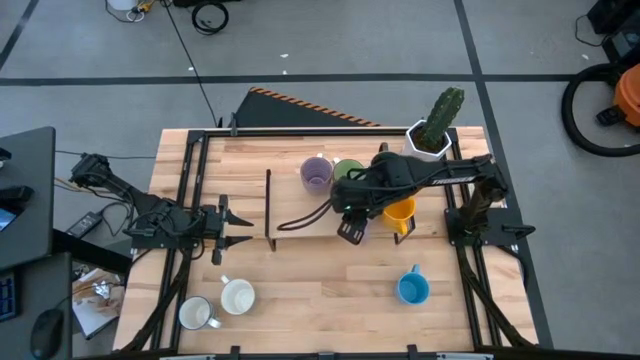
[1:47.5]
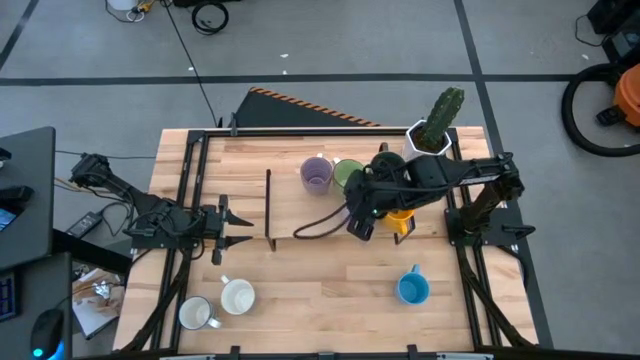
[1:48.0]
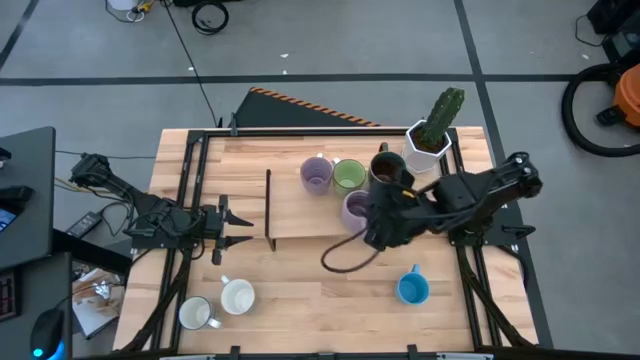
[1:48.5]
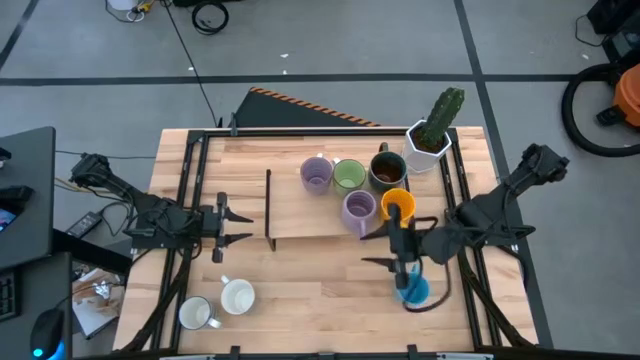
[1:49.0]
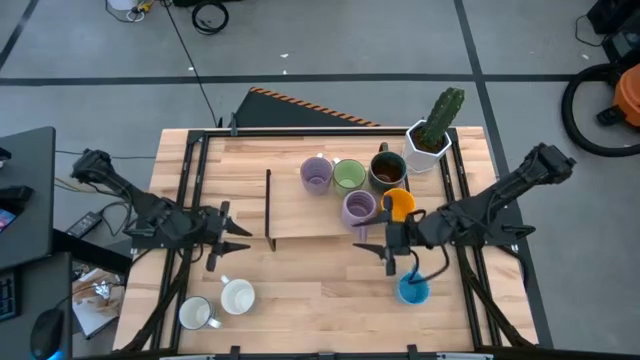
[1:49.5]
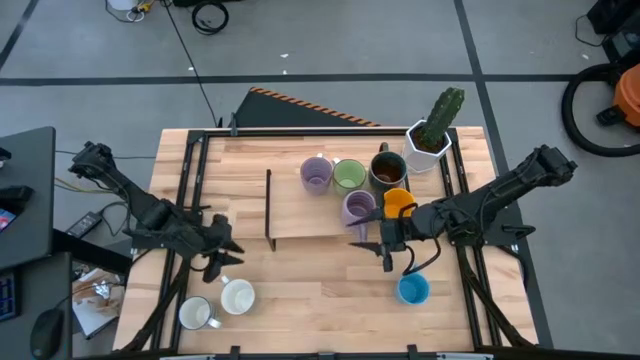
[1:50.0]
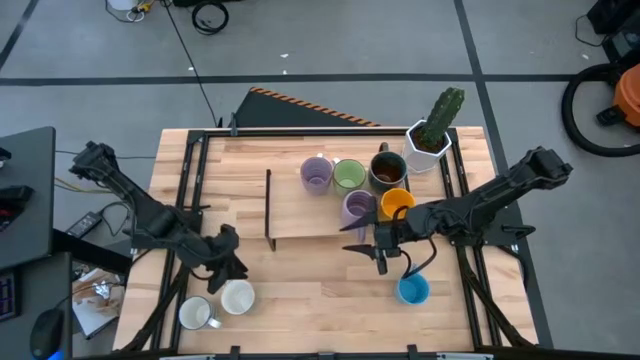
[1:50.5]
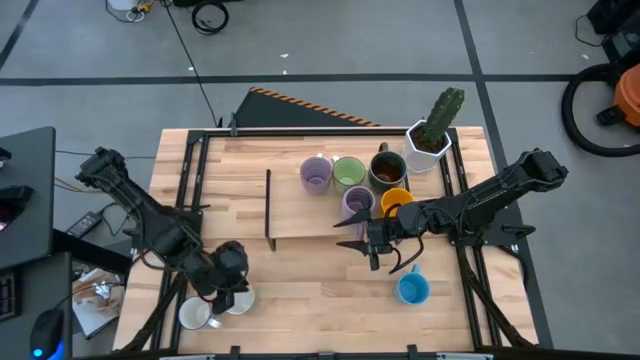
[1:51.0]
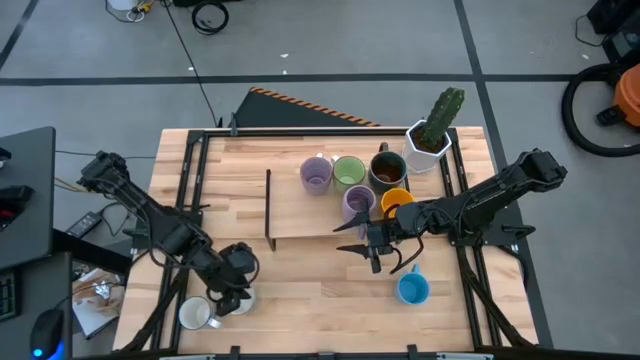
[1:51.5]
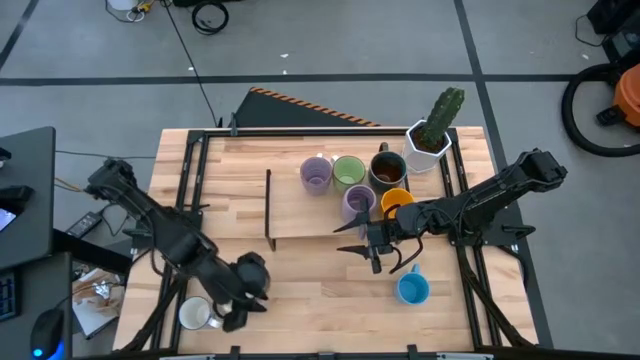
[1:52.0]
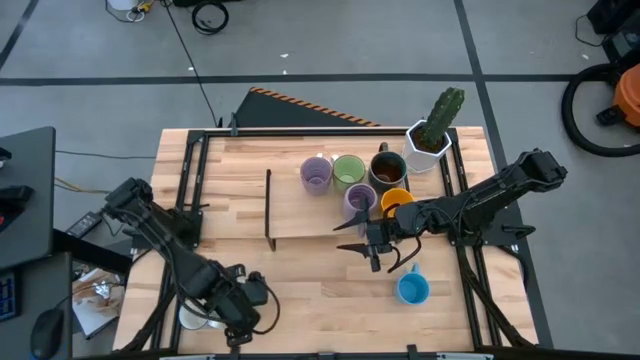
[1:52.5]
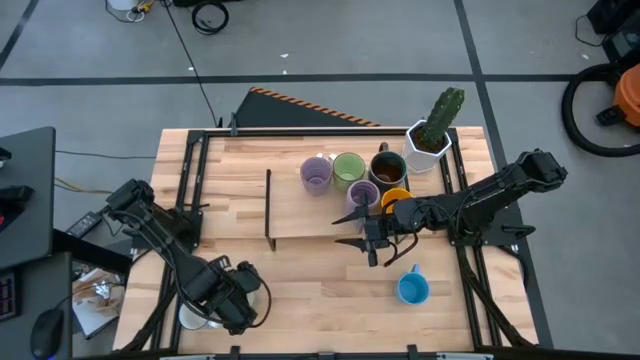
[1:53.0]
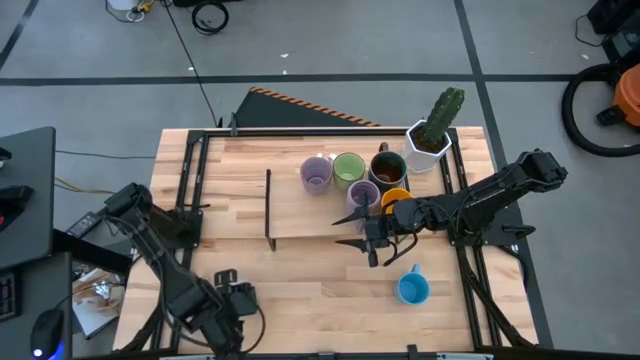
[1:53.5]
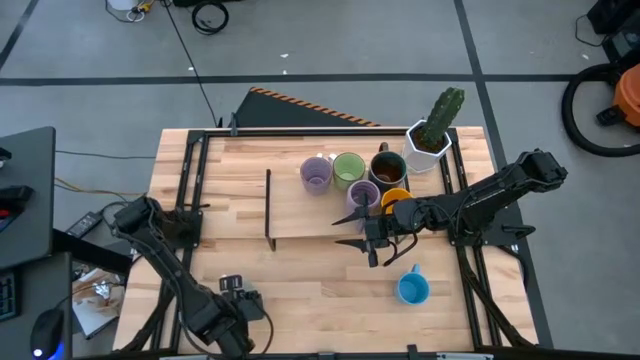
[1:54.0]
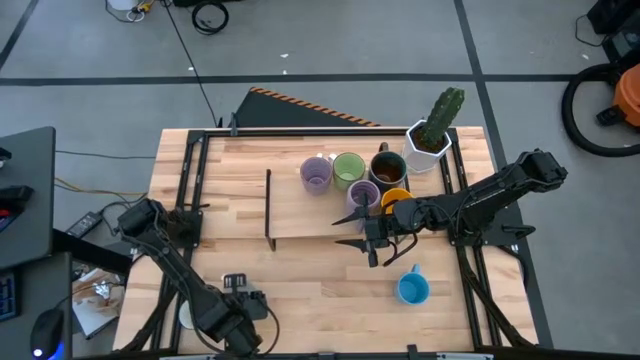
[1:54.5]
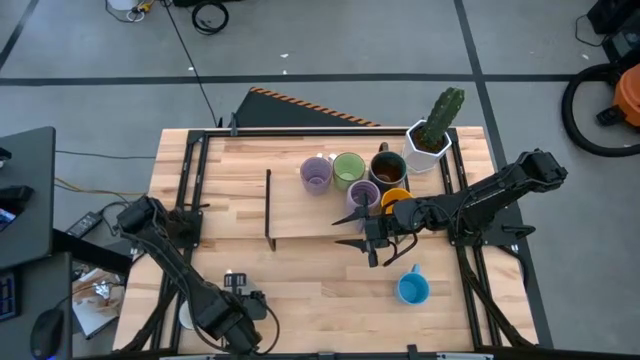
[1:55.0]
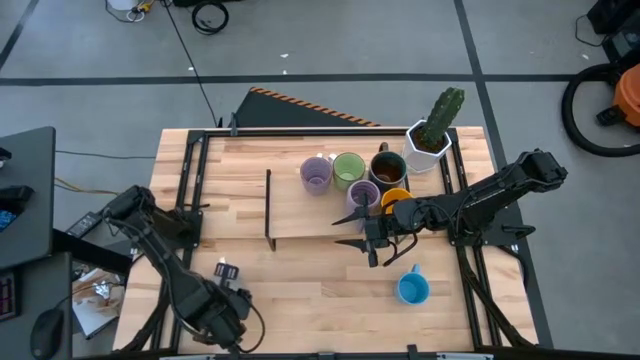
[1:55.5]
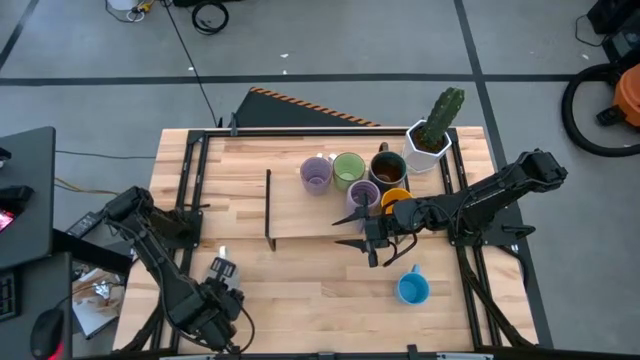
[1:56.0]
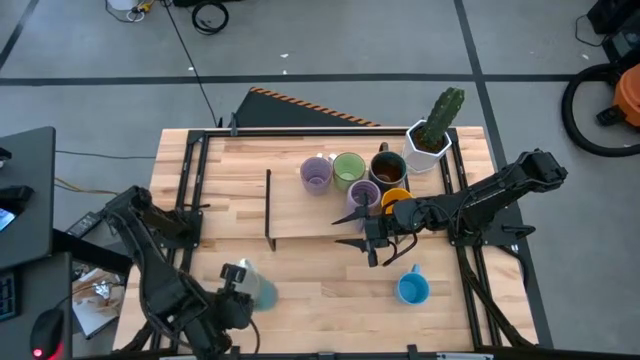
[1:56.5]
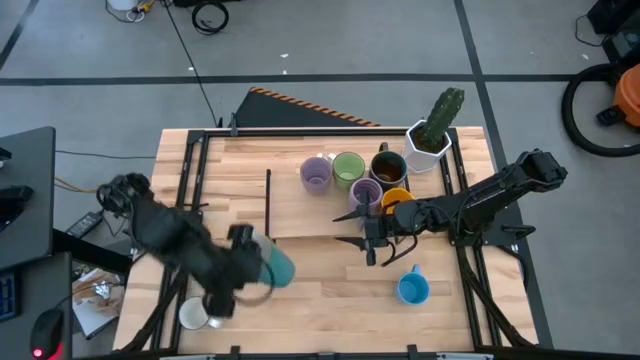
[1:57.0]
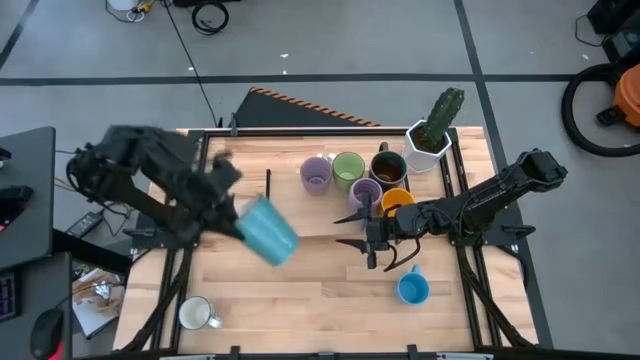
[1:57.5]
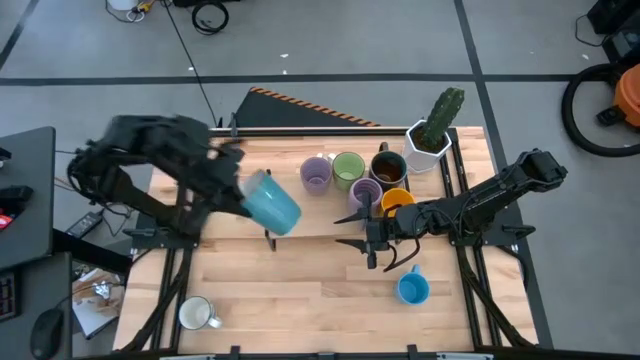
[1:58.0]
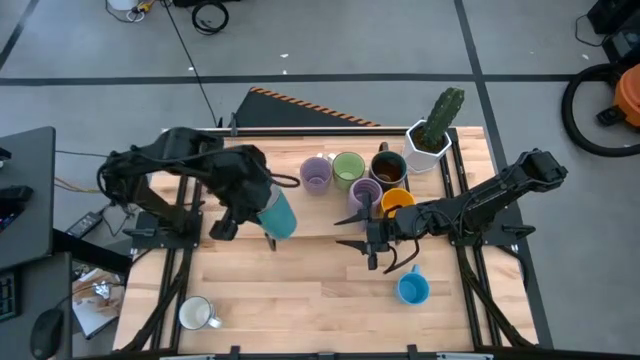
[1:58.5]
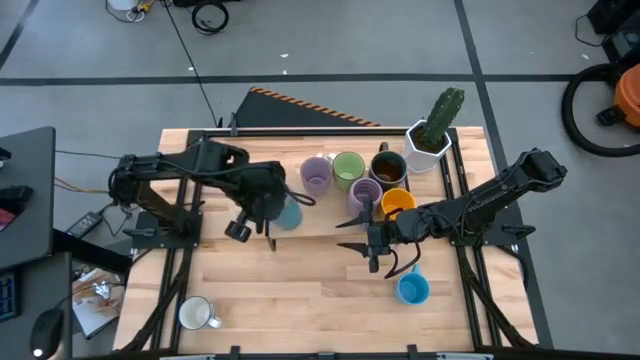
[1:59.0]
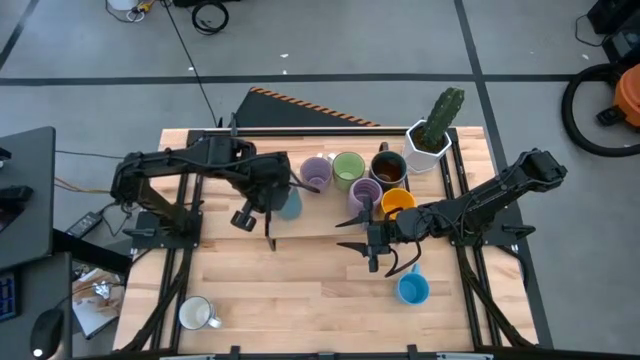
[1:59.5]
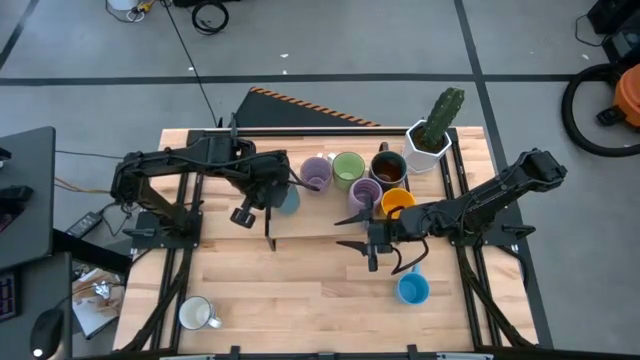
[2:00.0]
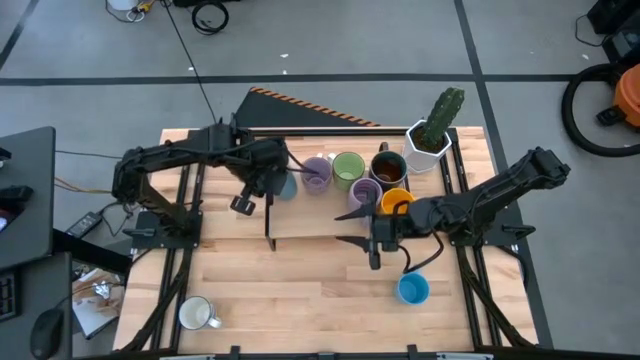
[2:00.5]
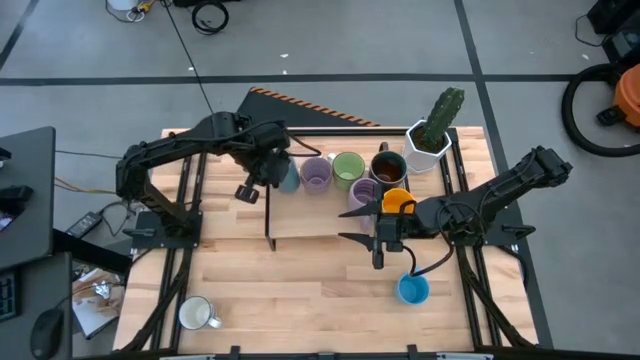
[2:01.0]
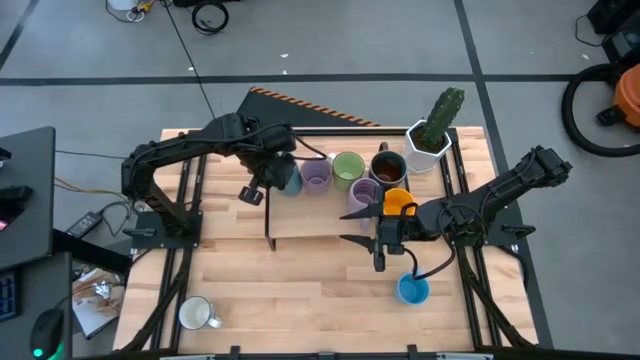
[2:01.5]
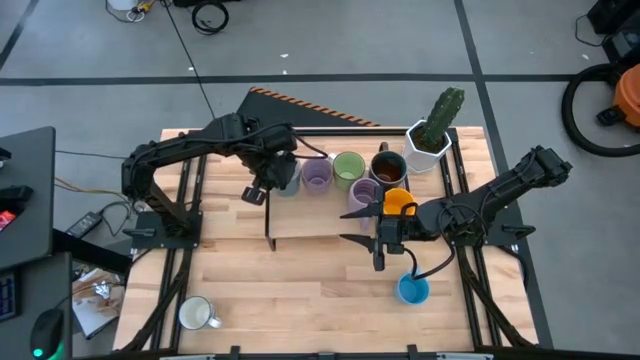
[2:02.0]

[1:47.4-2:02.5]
Task: Place coffee mugs
Put the white-blue mug on the shelf
